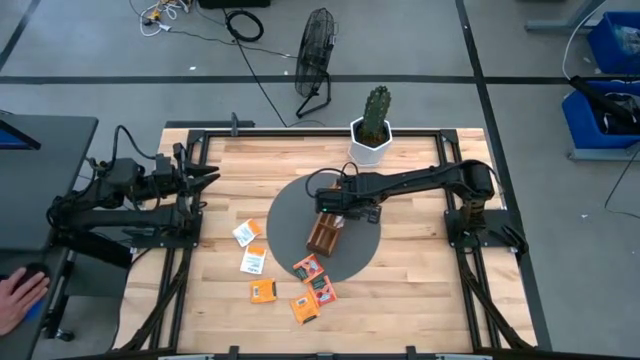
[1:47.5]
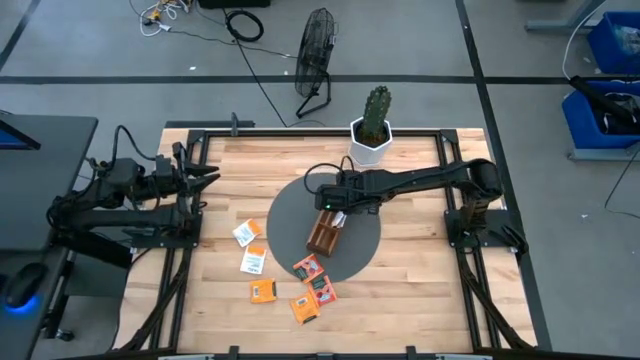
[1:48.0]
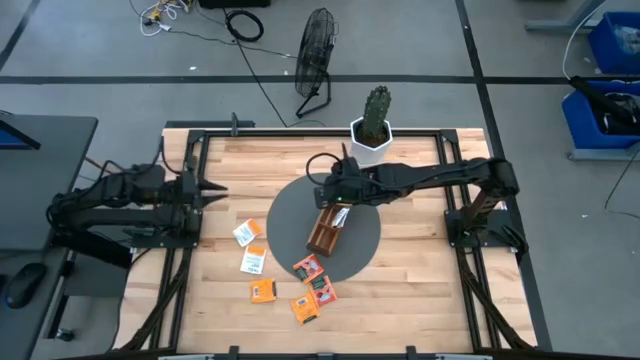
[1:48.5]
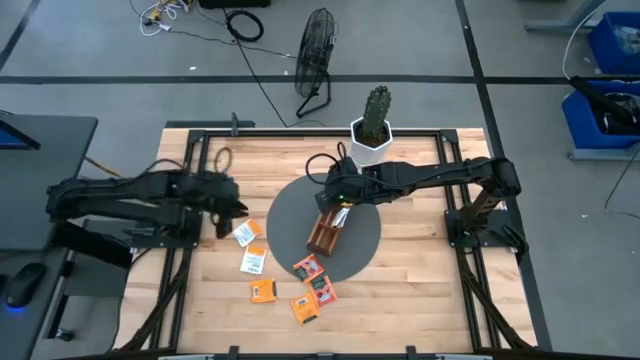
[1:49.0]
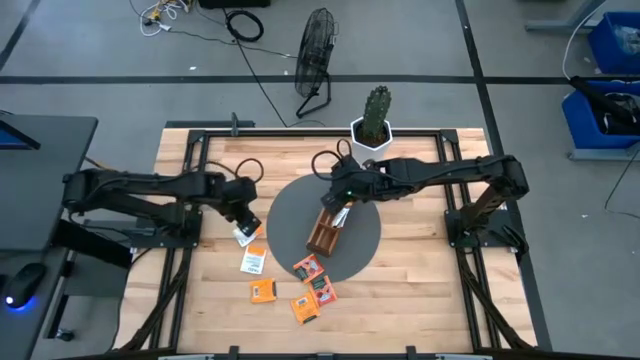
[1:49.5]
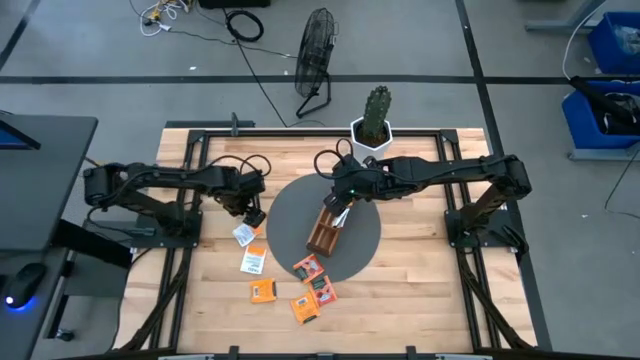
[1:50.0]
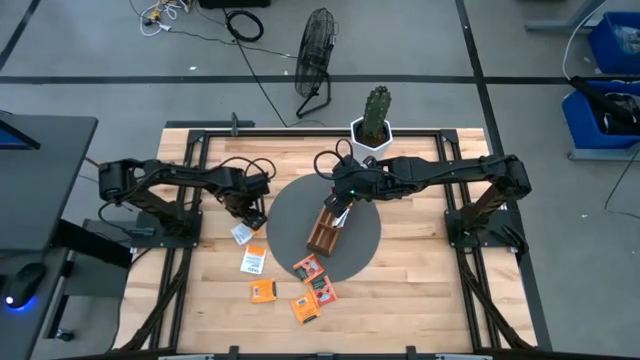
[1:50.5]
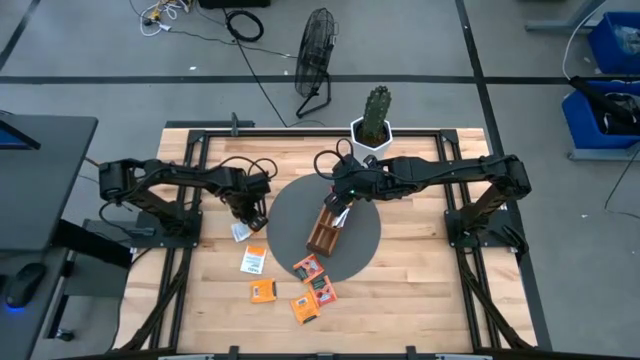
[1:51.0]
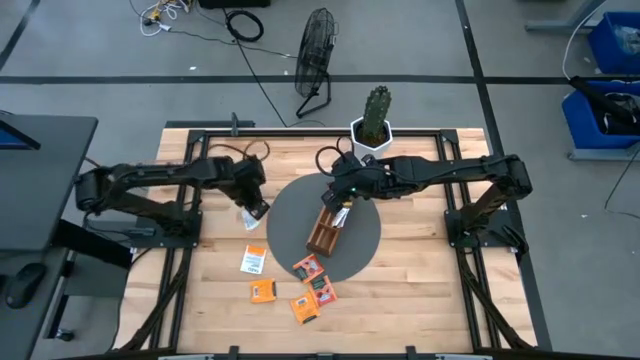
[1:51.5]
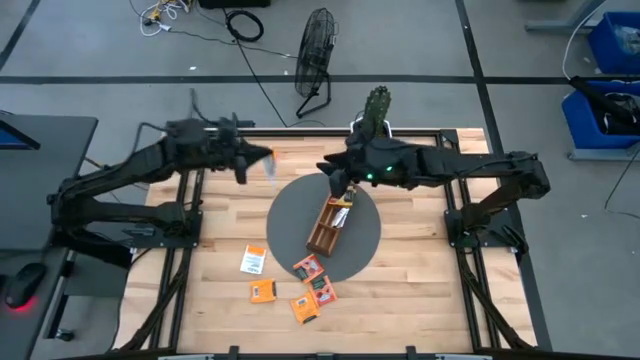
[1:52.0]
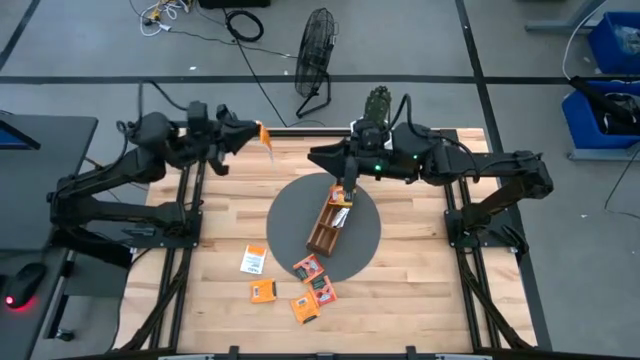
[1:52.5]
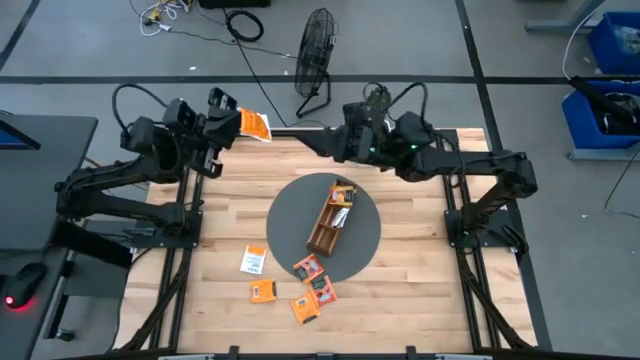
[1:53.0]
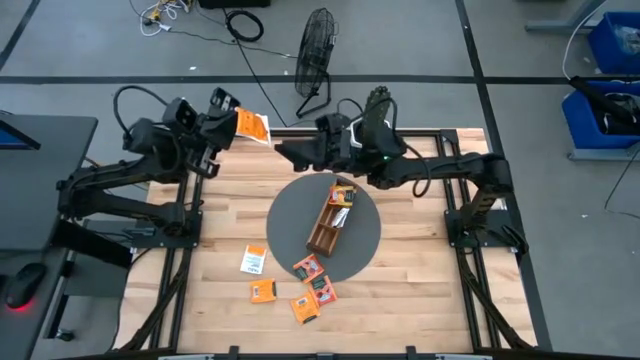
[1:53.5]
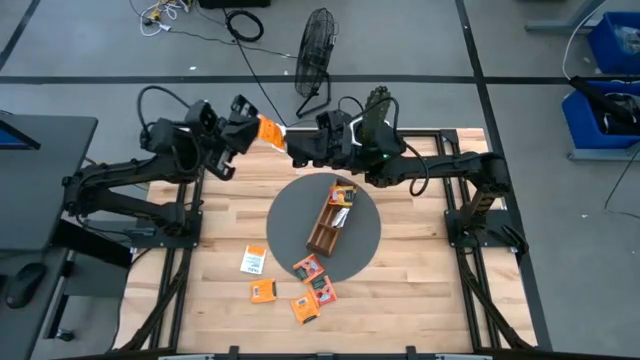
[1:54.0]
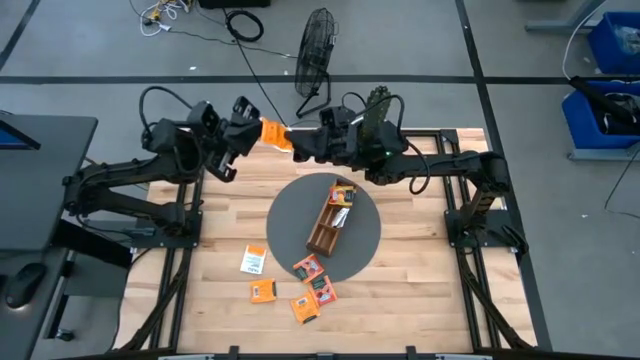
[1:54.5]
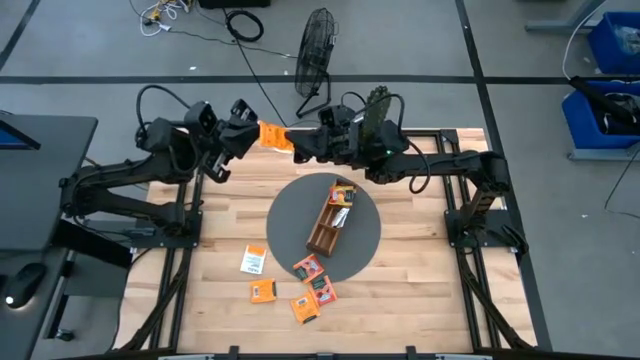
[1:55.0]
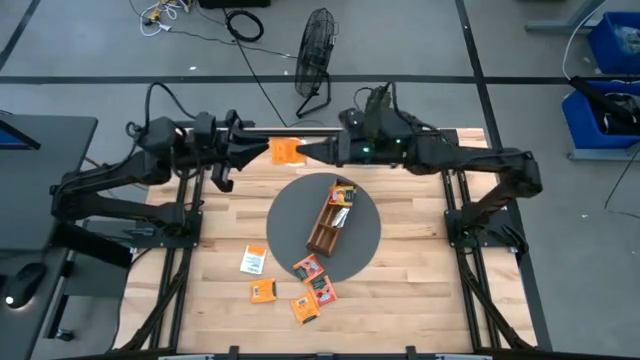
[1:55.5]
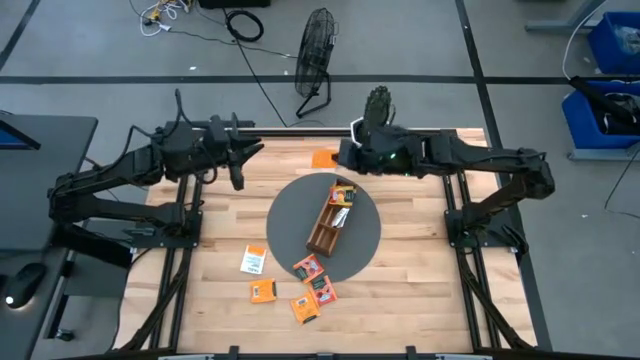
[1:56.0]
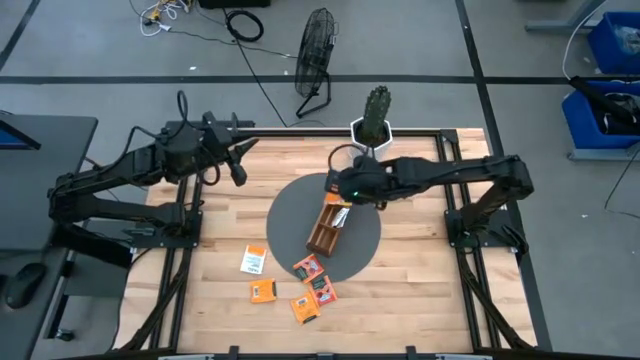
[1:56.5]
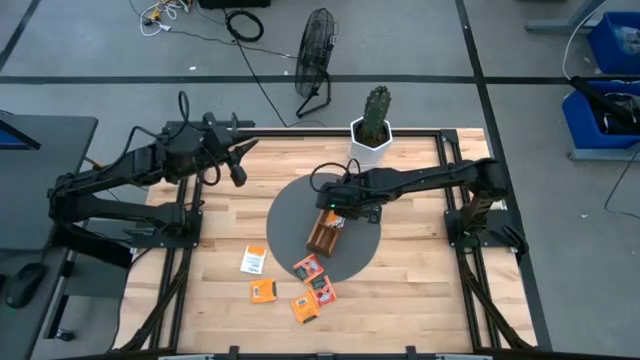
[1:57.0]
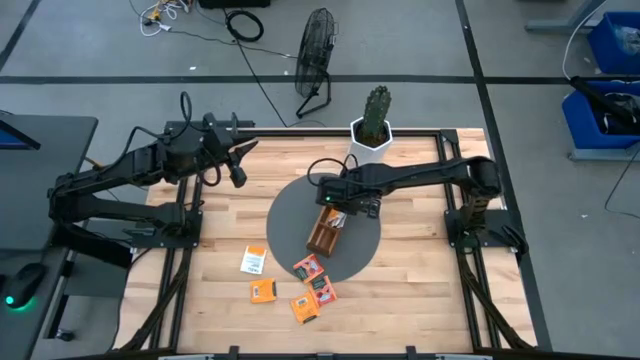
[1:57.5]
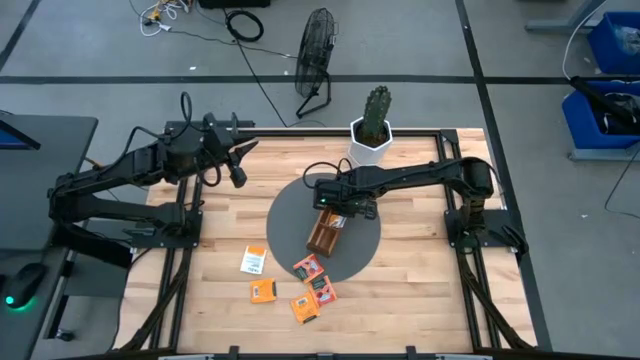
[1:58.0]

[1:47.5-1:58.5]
Task: Pick & Place Tea
Put the white tea bag into the middle section of the wooden organizer

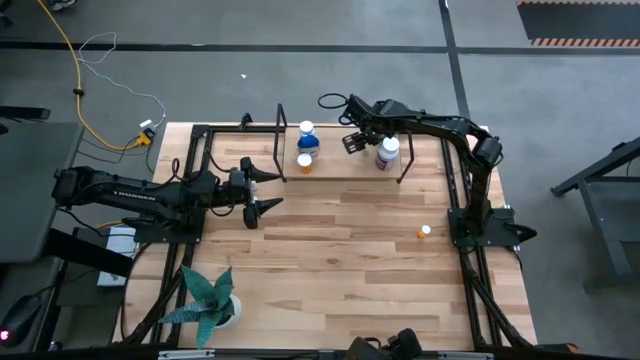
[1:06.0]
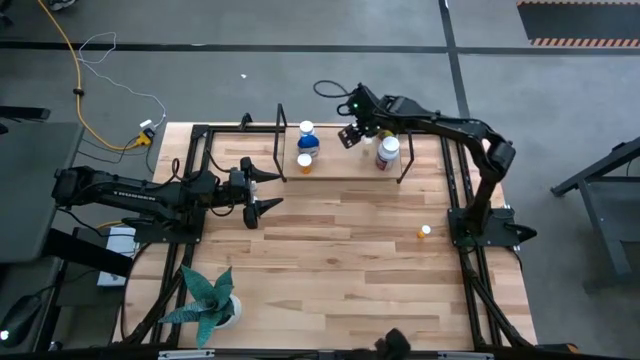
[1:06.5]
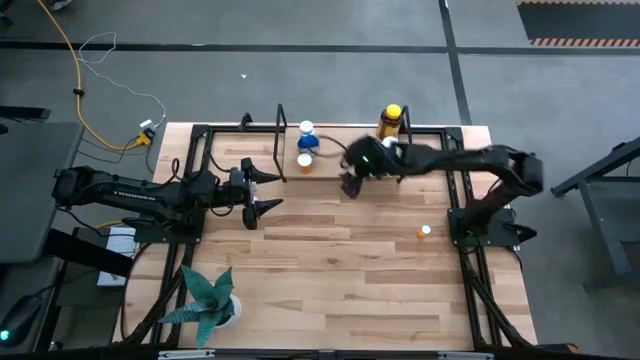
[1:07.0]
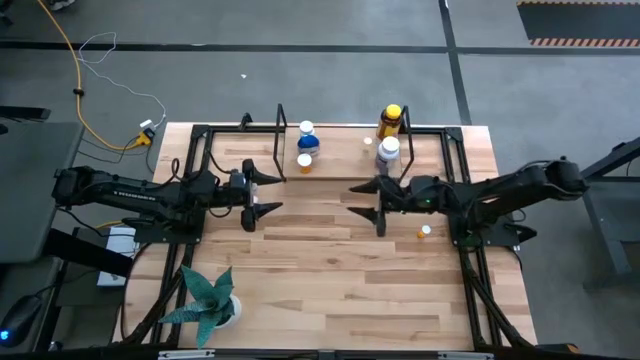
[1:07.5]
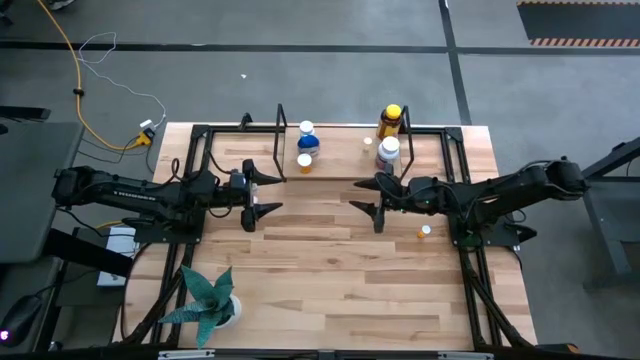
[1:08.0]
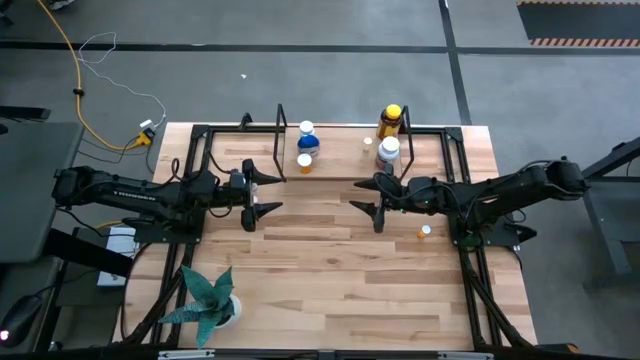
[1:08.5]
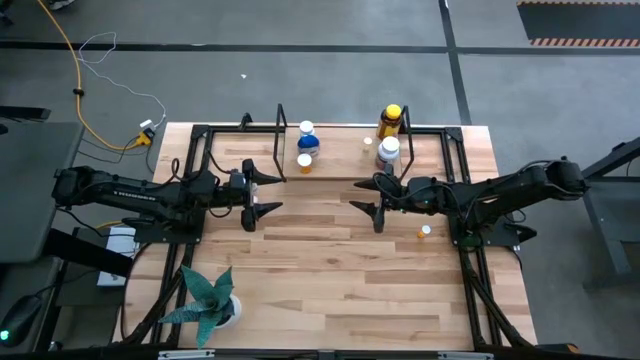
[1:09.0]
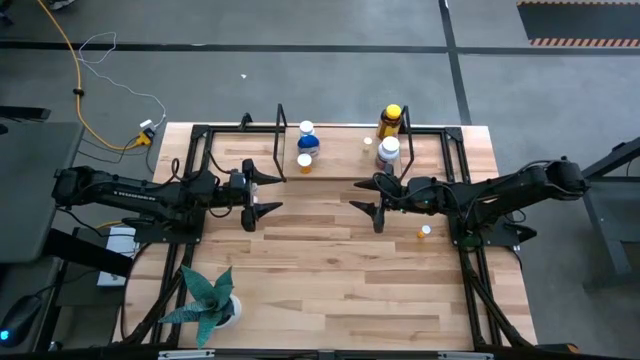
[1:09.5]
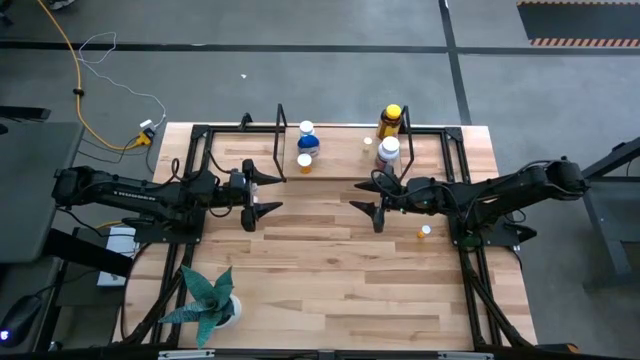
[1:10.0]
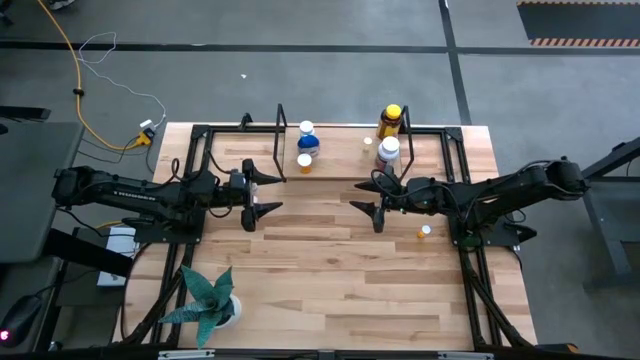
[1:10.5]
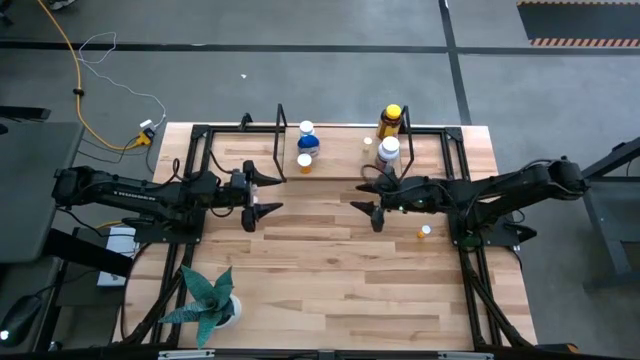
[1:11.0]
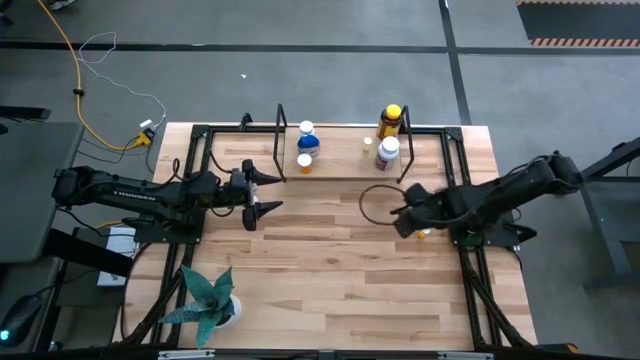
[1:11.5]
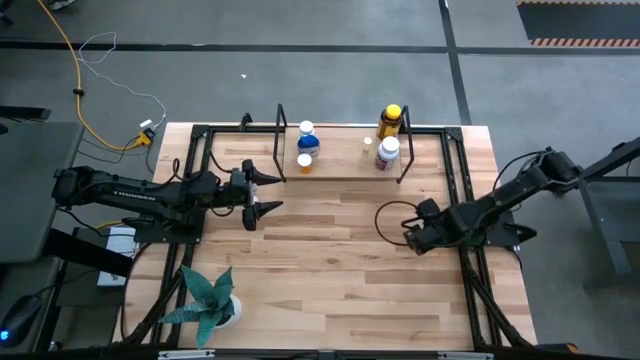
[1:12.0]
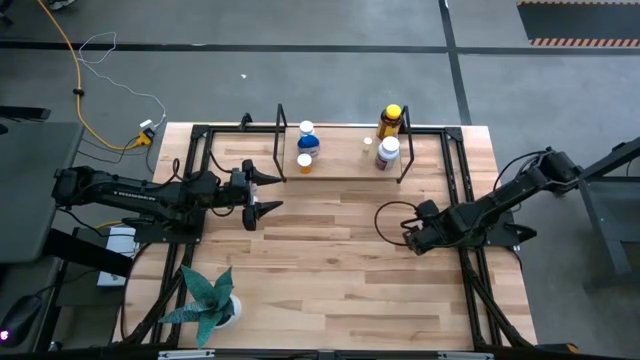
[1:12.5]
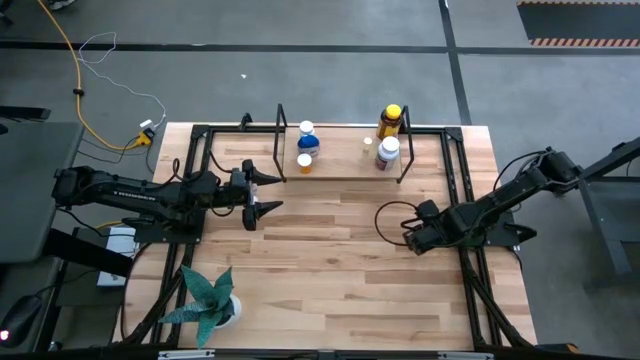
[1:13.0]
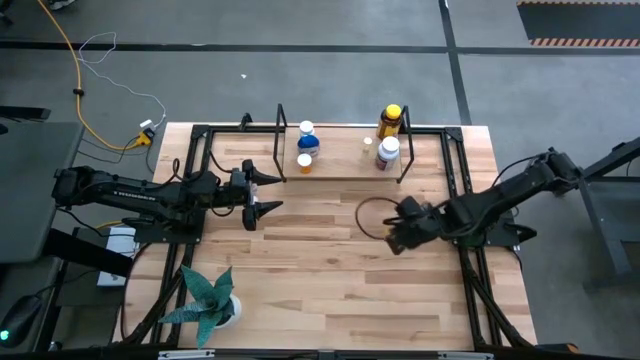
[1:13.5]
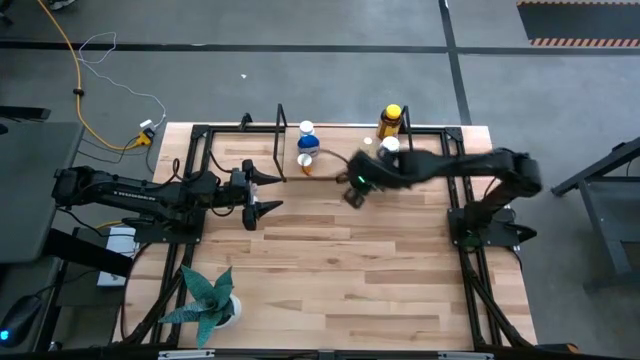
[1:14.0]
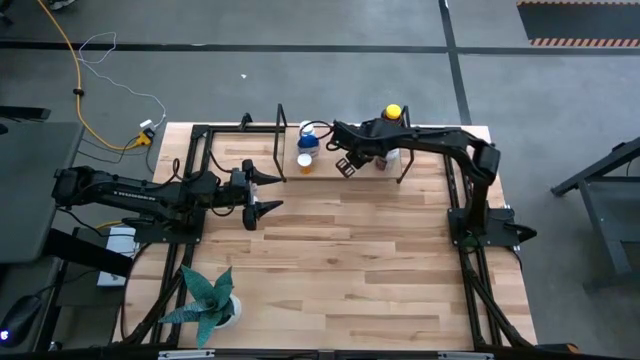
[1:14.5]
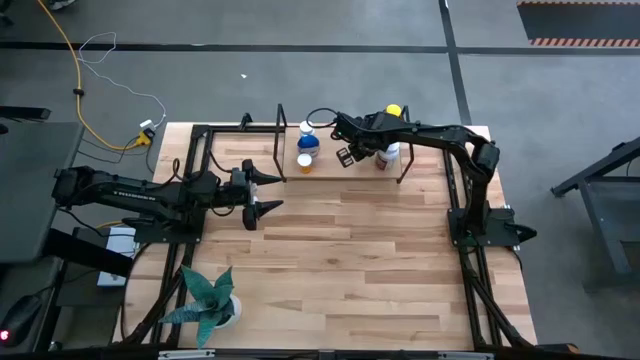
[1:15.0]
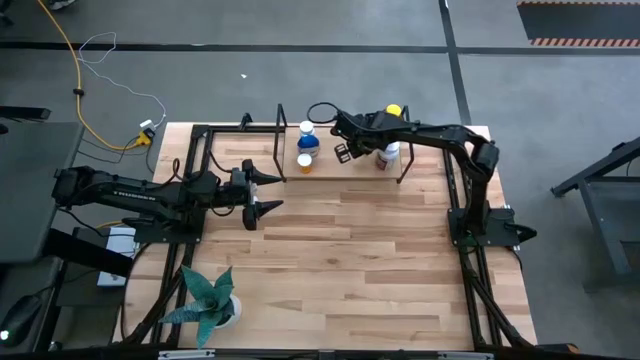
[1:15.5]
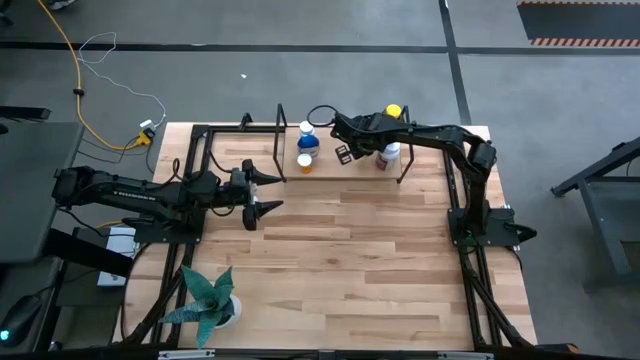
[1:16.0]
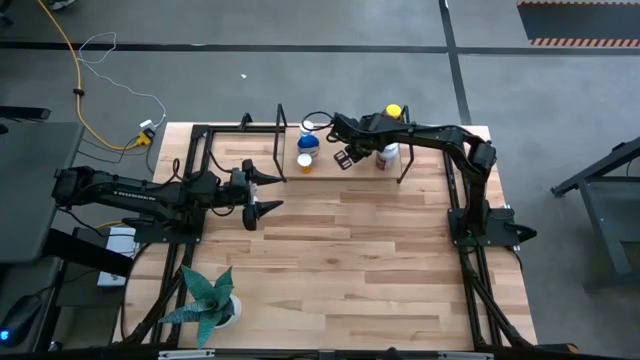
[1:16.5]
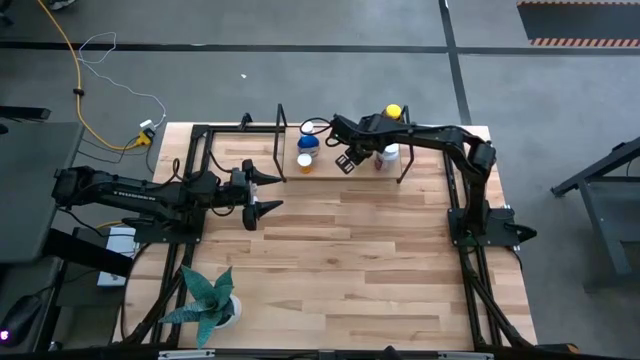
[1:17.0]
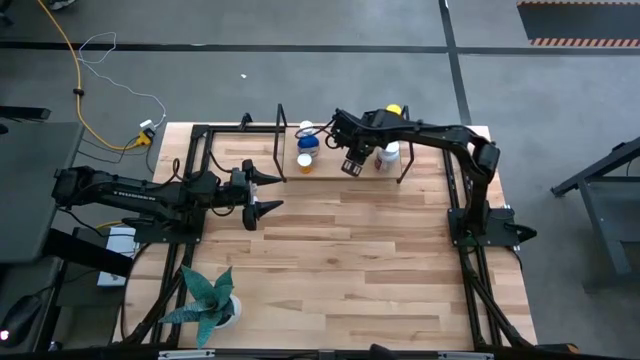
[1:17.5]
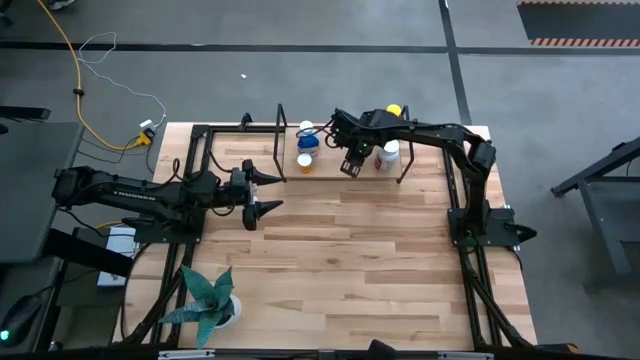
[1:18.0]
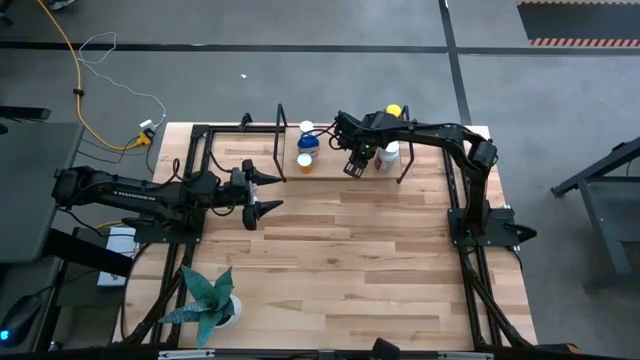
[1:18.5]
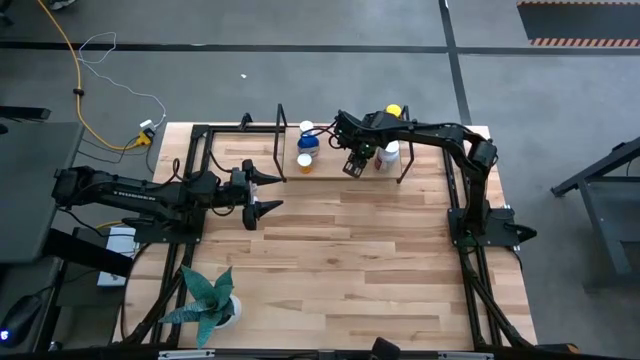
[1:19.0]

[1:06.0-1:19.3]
Task: Pick and place medicine bottles onto shelf by color
Put the orange pill bottle on the shelf
